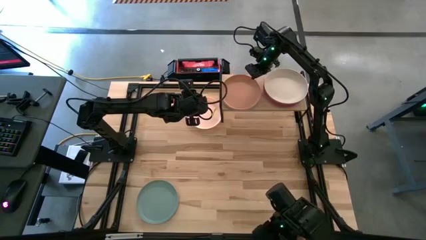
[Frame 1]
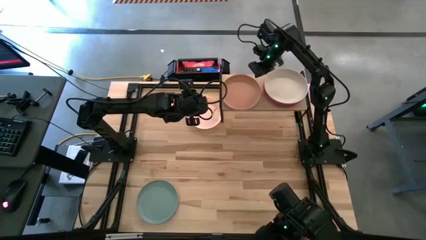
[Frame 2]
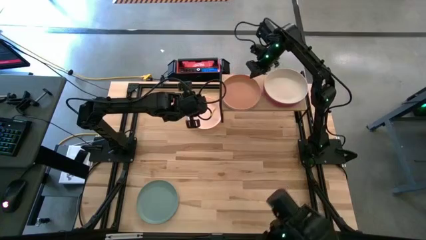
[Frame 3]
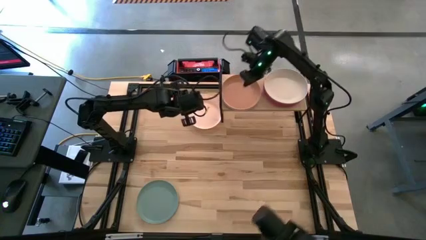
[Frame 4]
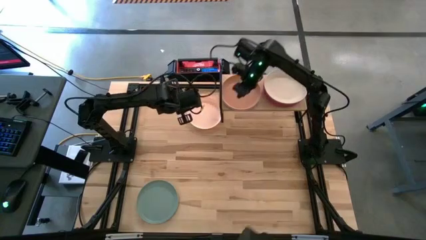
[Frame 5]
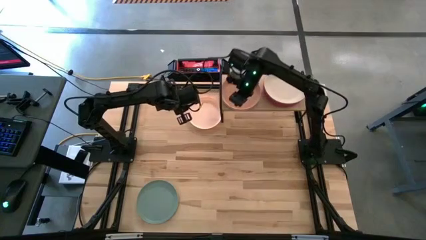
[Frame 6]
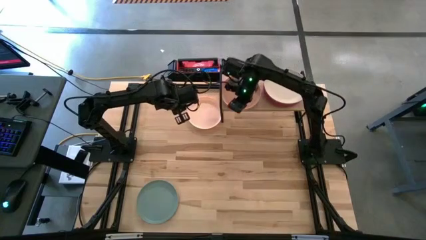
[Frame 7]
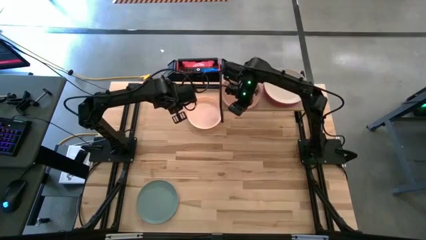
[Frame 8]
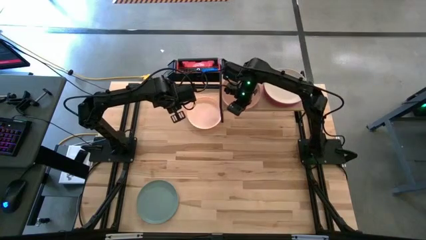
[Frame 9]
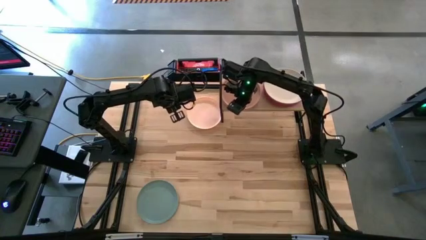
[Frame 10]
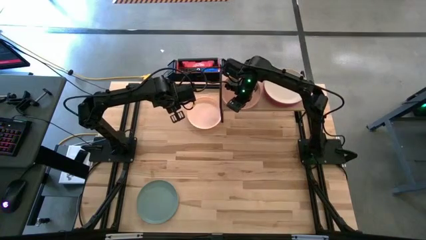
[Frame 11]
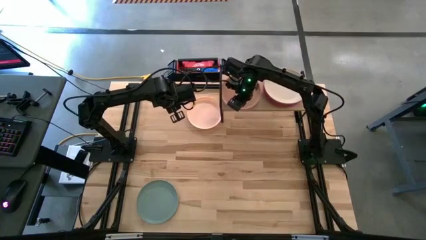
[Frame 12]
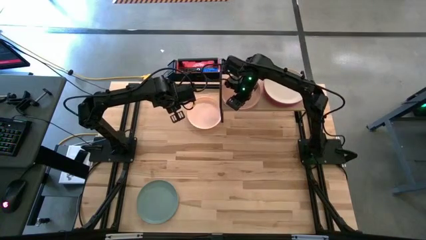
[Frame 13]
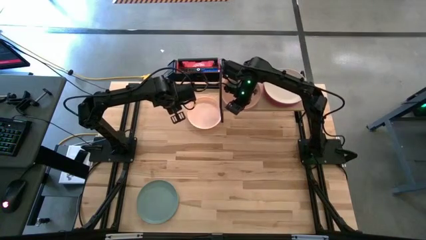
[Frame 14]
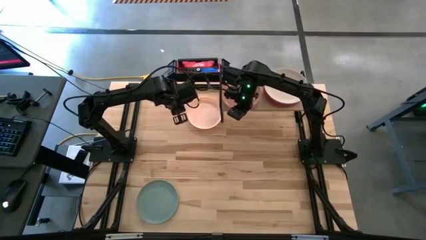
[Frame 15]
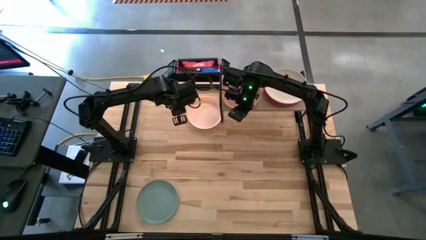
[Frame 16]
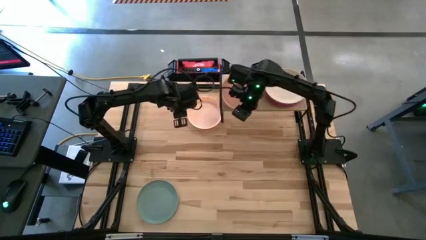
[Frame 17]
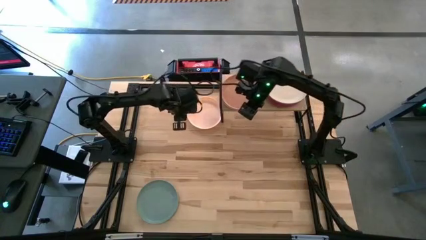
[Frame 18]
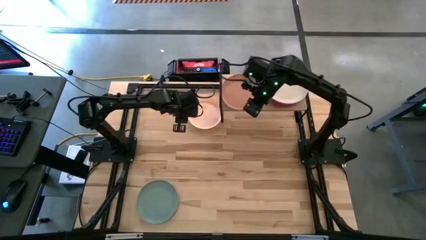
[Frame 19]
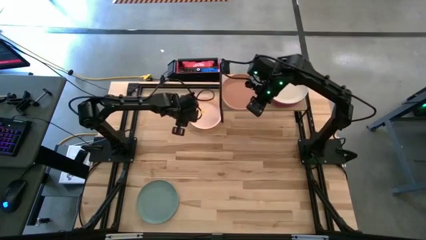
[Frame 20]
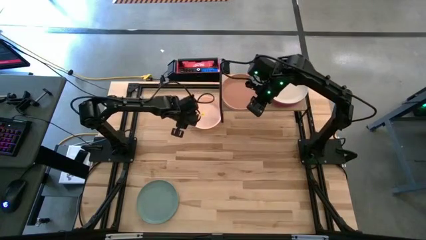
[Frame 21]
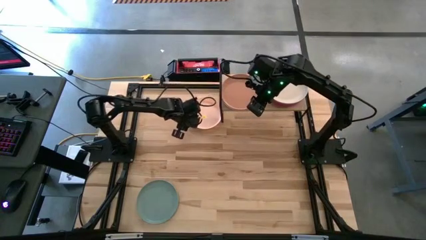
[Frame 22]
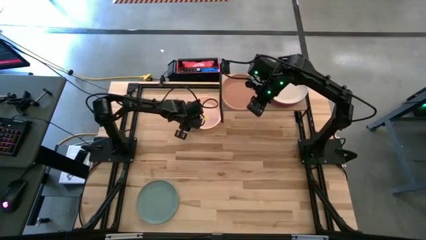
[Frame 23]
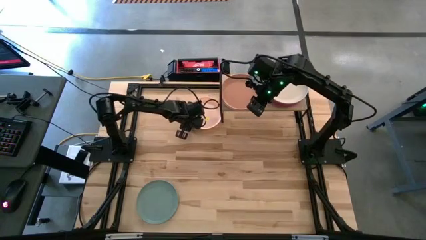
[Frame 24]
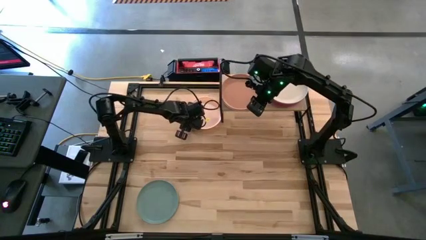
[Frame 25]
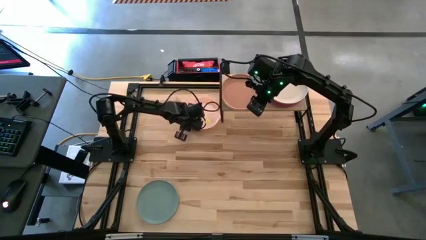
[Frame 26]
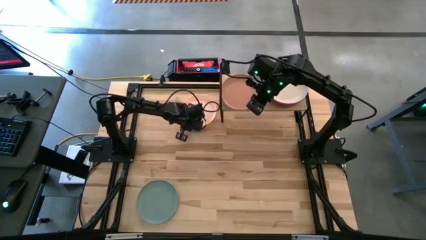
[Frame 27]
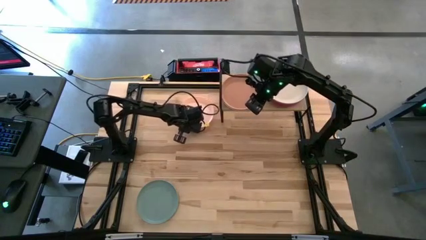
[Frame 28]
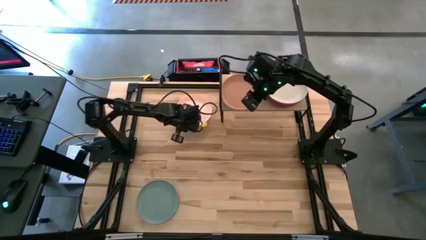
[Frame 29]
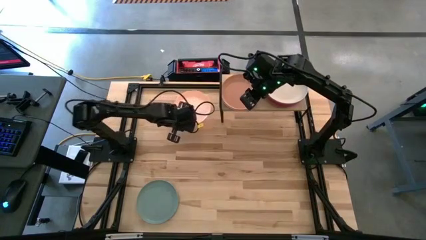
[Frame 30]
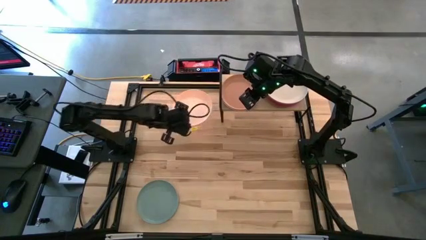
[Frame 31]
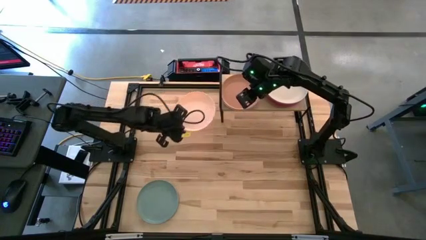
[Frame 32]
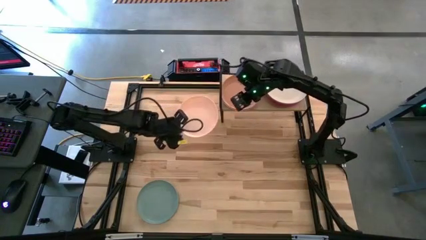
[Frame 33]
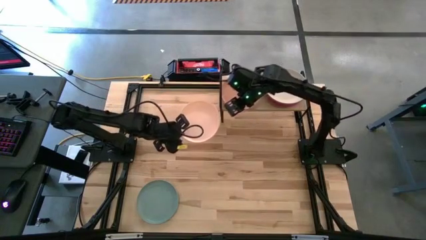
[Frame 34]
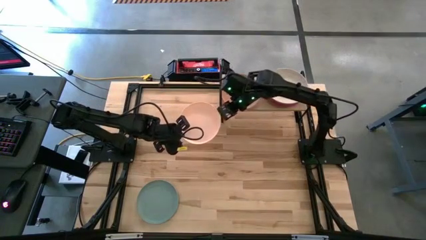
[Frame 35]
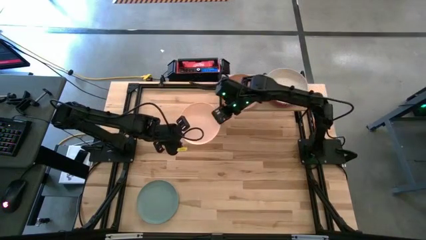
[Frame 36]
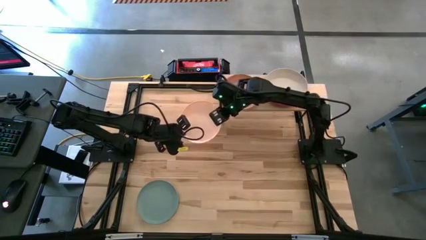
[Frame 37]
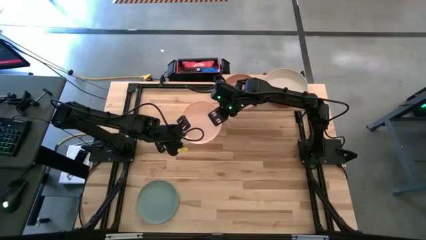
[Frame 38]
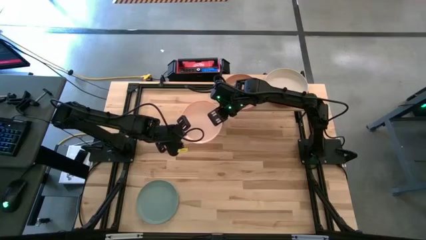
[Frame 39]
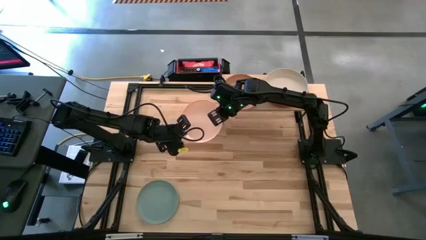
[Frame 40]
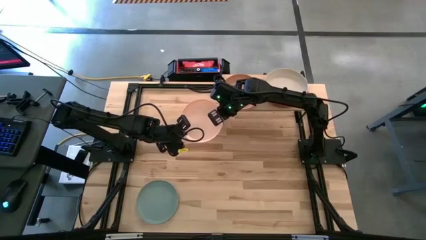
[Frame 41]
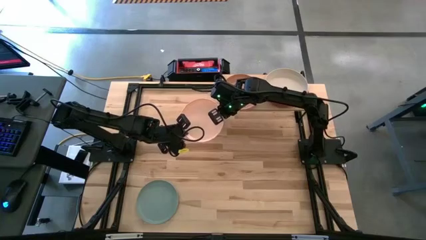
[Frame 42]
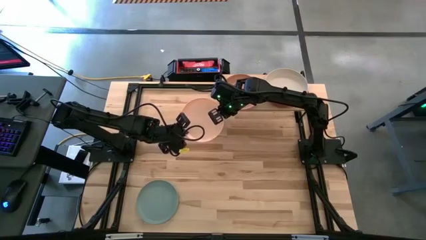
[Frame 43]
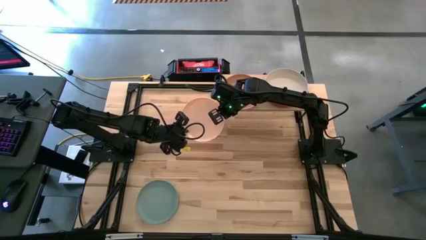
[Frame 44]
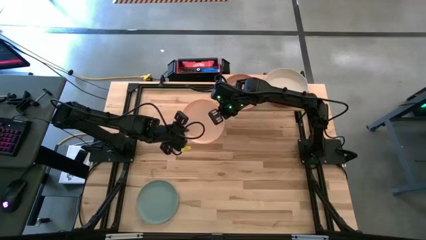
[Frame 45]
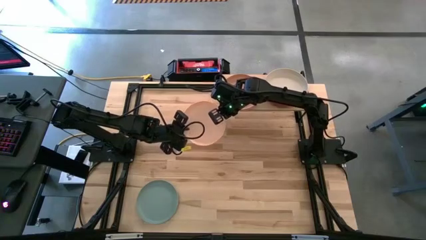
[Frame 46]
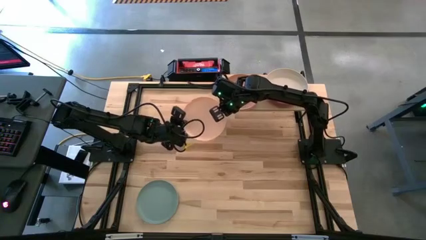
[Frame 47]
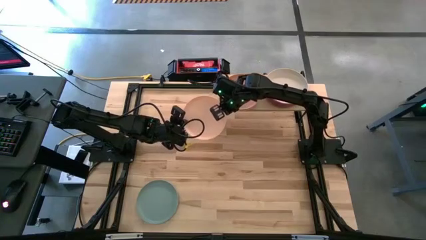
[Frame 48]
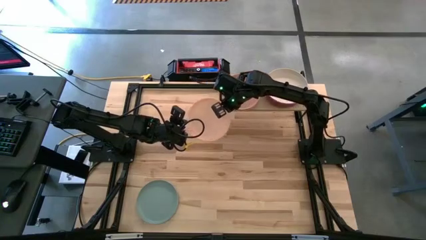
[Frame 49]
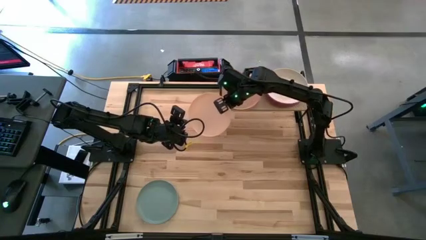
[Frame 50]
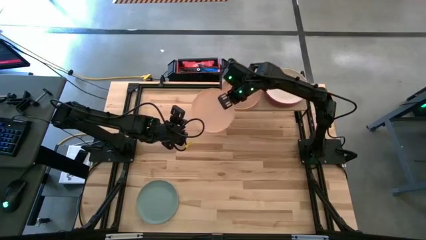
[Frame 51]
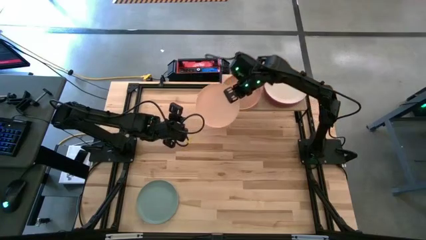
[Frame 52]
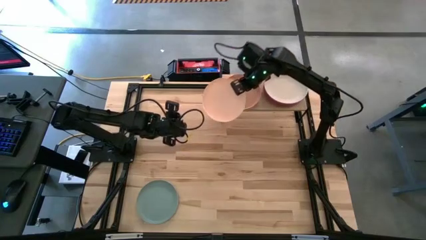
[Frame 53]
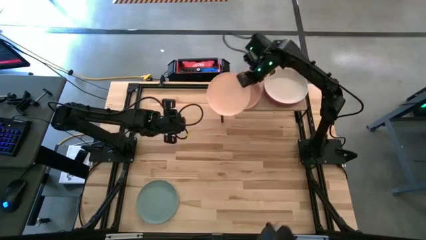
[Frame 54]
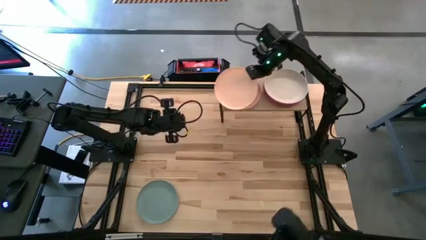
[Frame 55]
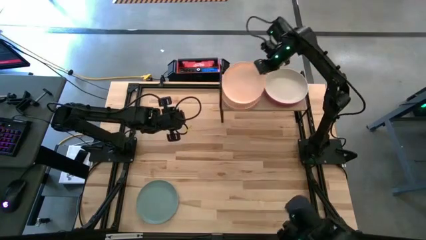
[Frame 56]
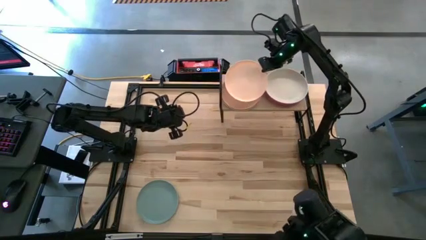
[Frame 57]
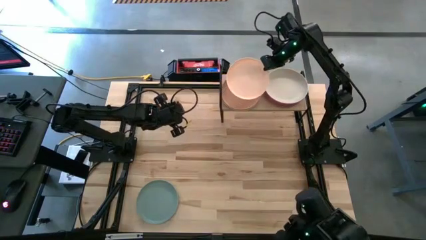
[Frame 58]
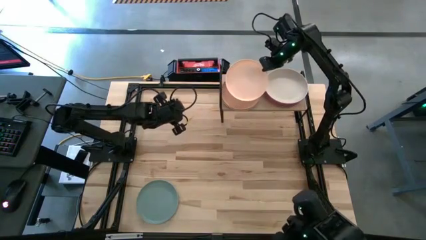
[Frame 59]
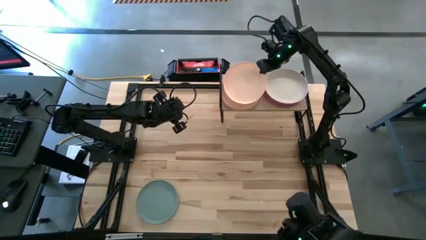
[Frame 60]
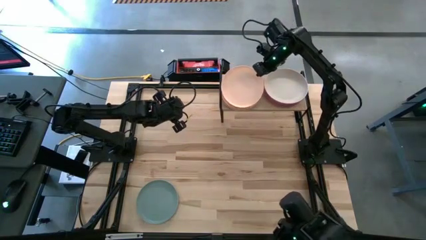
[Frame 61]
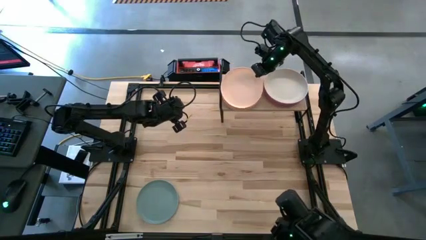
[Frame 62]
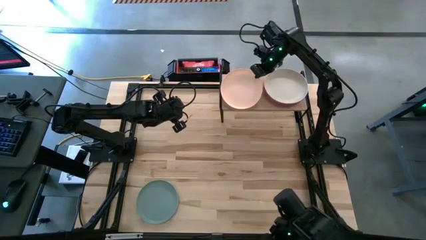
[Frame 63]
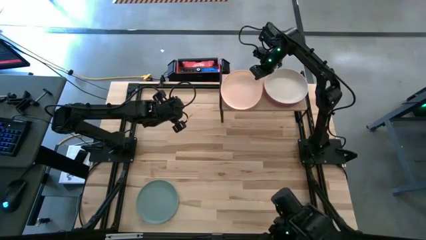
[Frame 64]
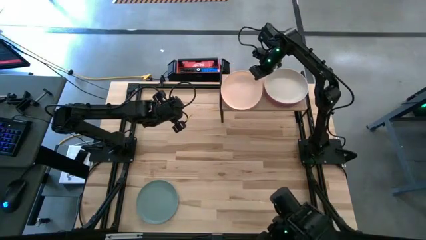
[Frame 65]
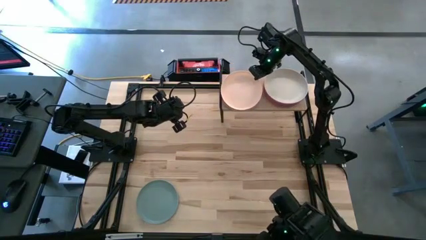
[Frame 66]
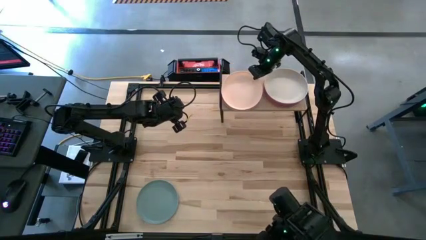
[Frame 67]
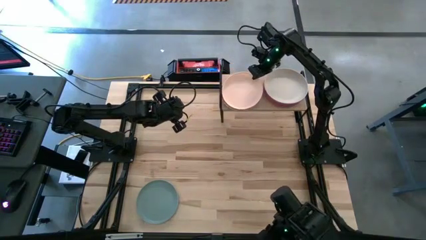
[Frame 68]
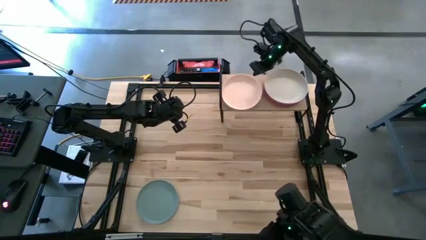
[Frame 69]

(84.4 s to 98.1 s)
Task: Place and stack plates onto a shelf
Stack the light brown plate on top of the brown plate

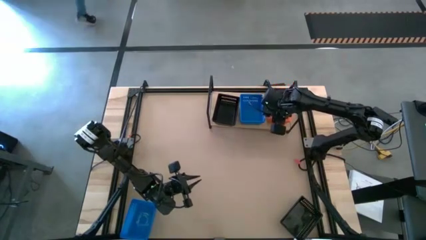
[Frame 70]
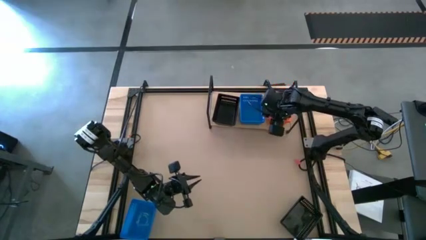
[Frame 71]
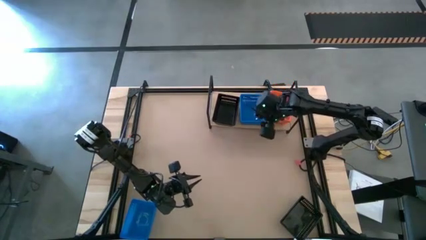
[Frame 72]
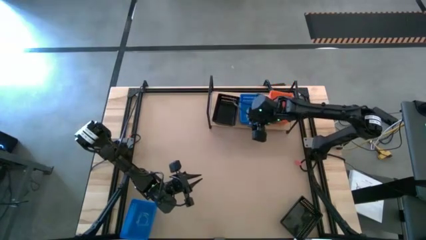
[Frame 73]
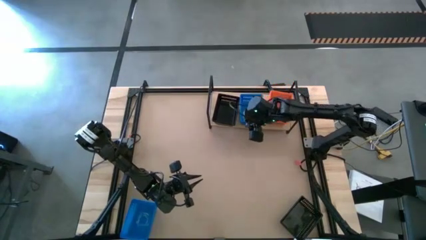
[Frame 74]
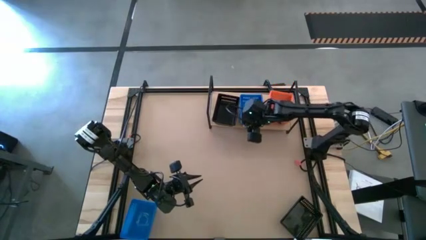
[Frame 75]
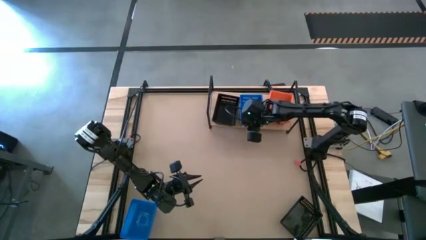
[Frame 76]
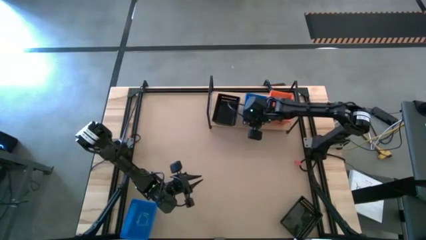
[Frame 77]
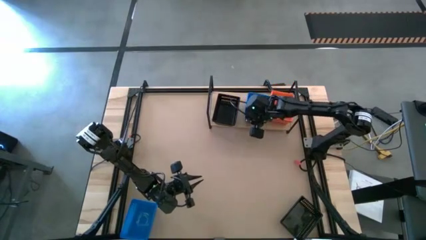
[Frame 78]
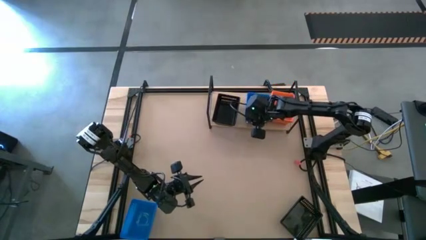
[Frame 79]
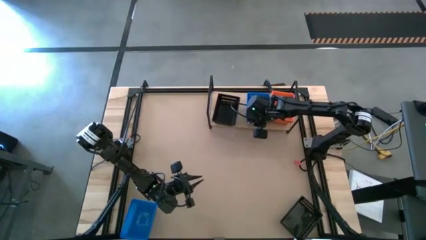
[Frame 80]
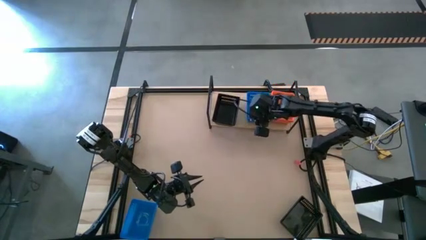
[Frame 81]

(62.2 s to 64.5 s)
Task: Stack baskets on shelf by color
Adjust the blue baskets on the shelf

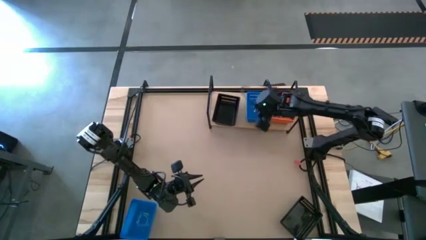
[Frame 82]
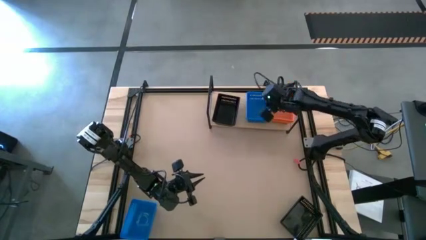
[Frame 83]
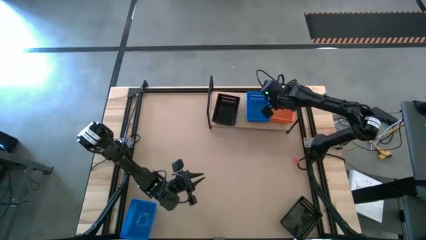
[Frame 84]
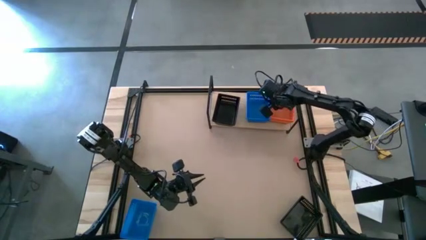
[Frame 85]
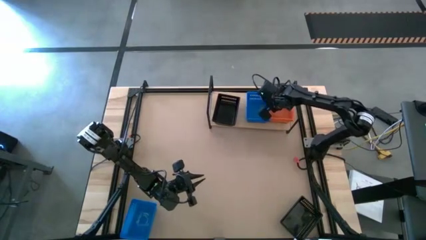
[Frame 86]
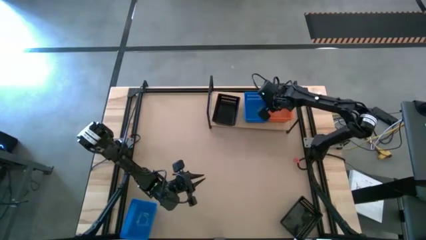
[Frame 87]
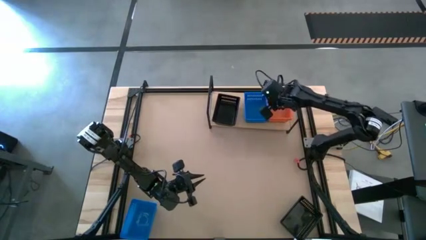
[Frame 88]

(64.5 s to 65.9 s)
Adjust the orange baskets on the shelf
